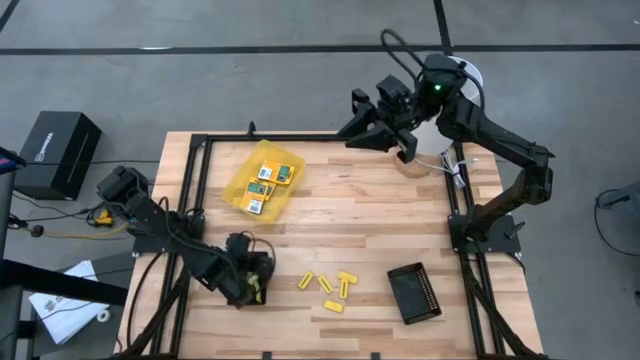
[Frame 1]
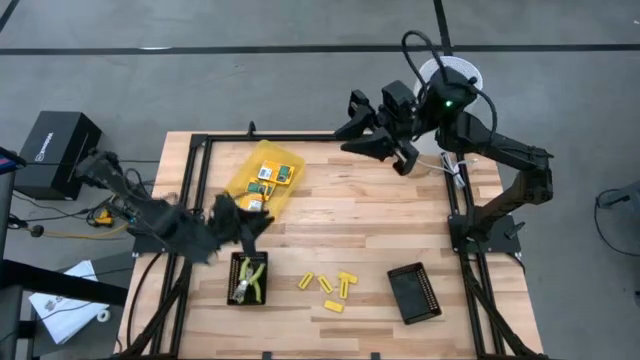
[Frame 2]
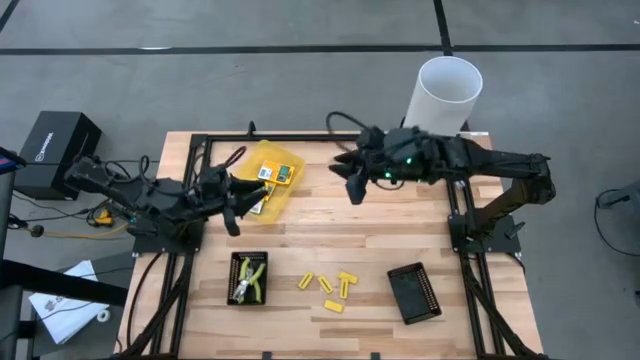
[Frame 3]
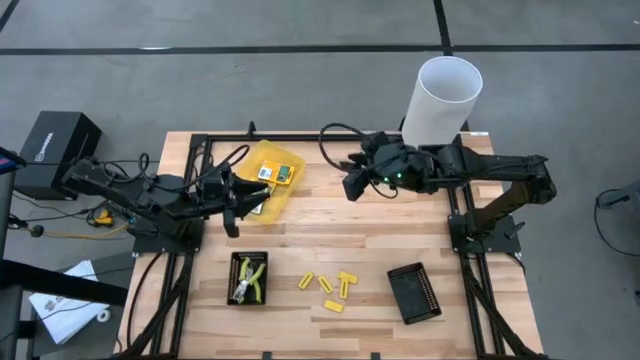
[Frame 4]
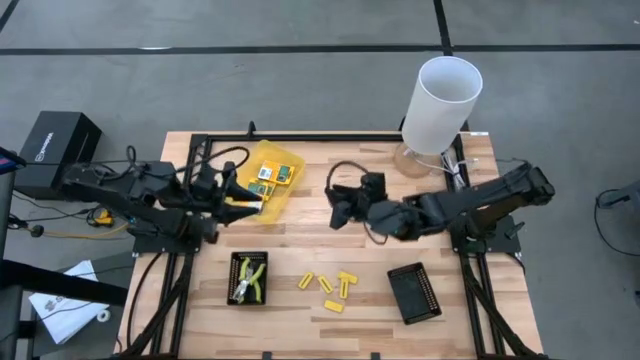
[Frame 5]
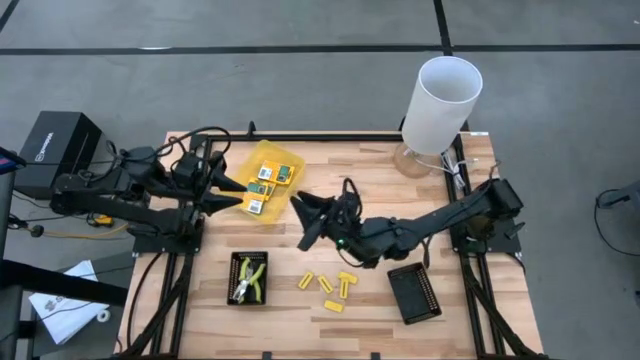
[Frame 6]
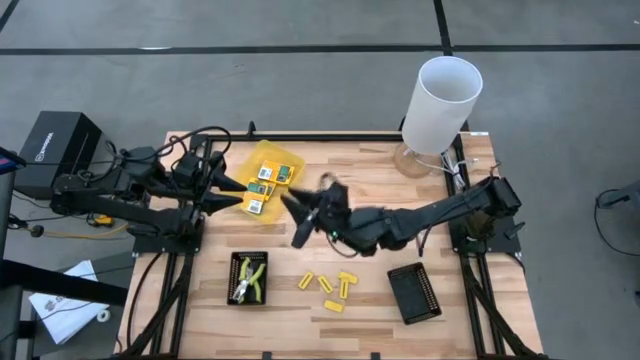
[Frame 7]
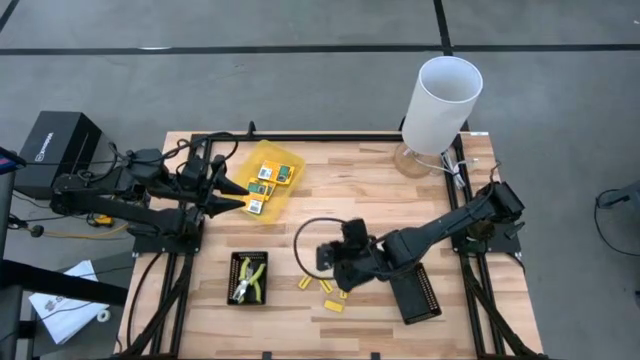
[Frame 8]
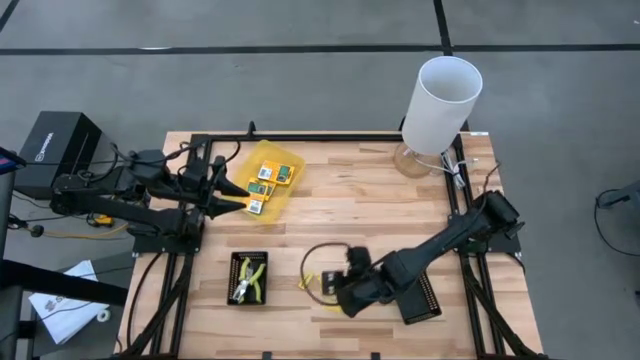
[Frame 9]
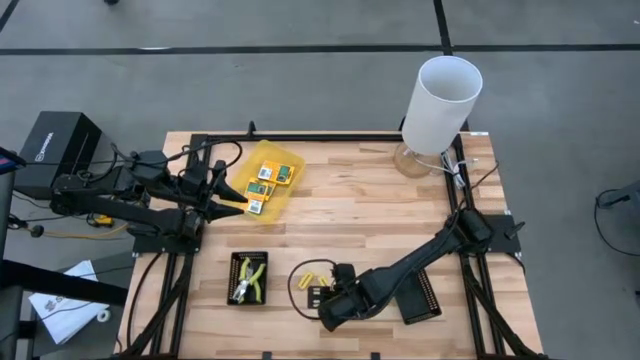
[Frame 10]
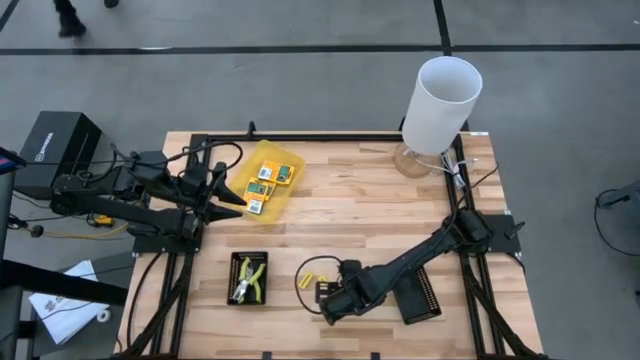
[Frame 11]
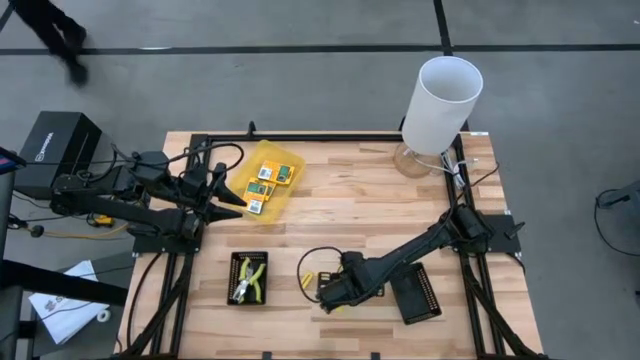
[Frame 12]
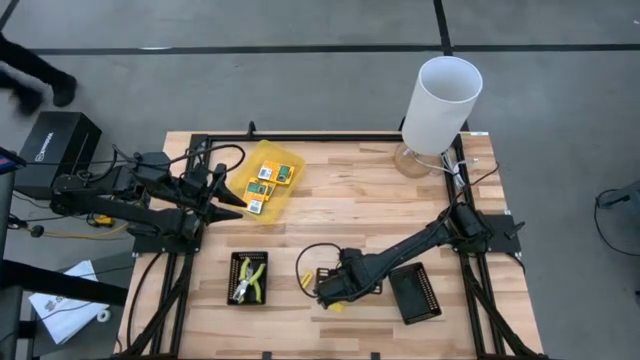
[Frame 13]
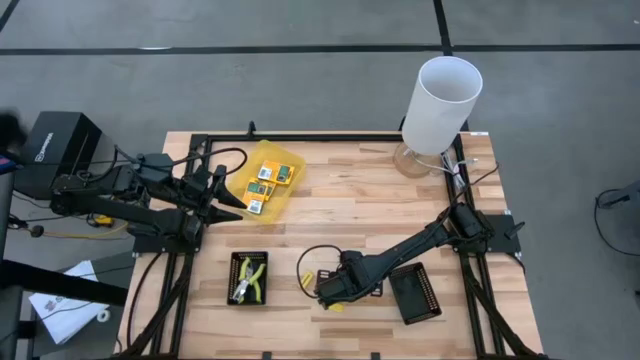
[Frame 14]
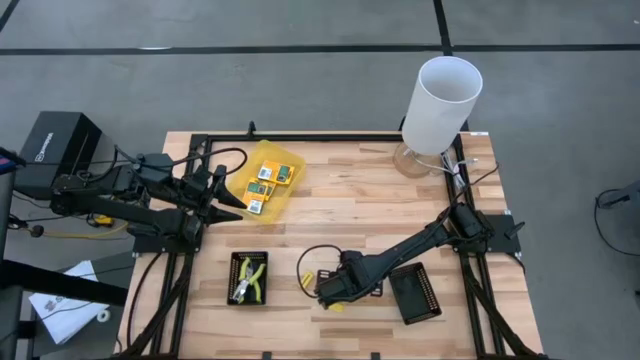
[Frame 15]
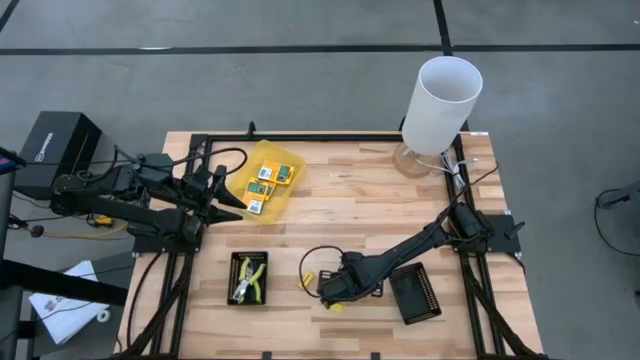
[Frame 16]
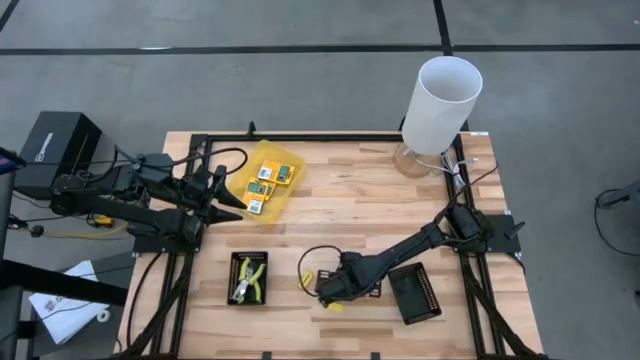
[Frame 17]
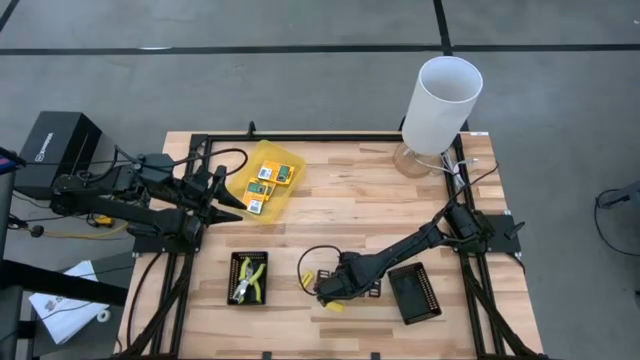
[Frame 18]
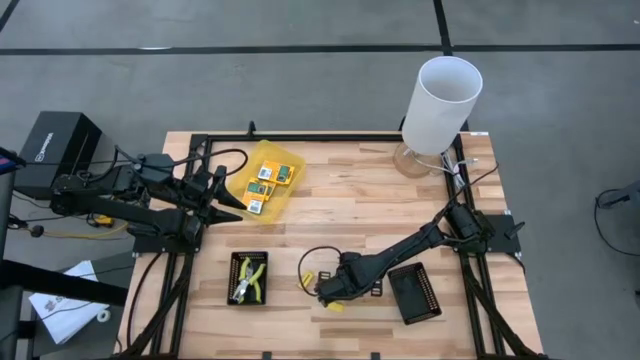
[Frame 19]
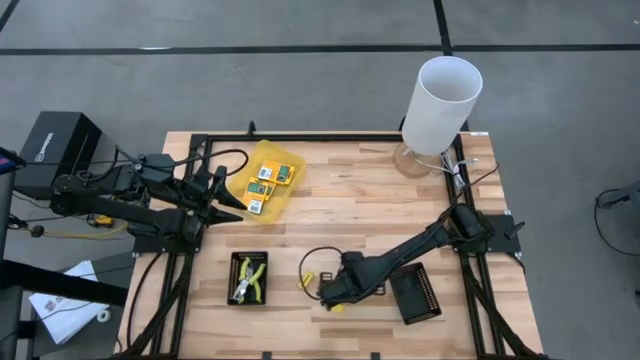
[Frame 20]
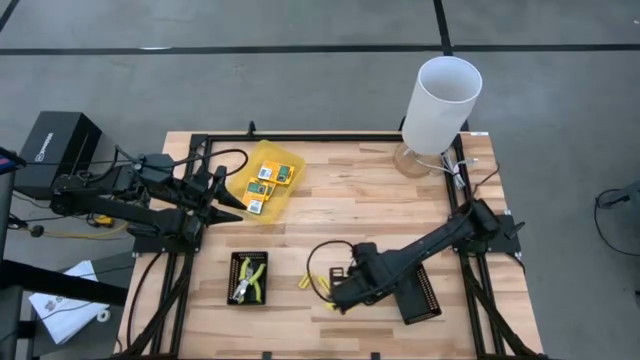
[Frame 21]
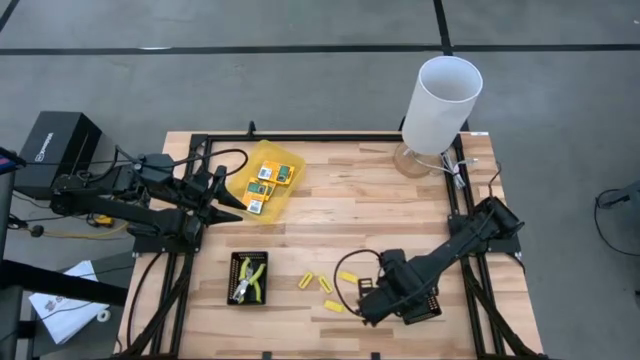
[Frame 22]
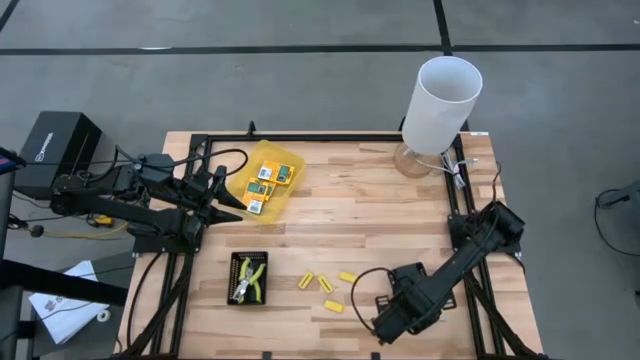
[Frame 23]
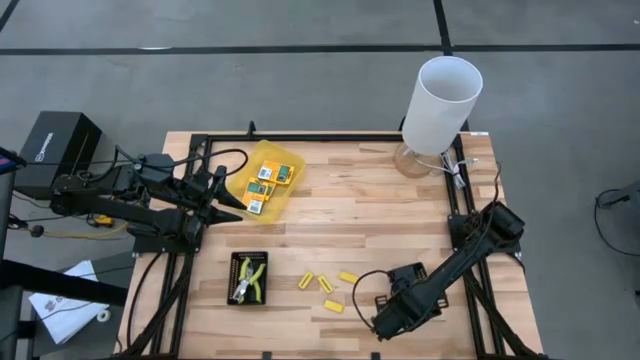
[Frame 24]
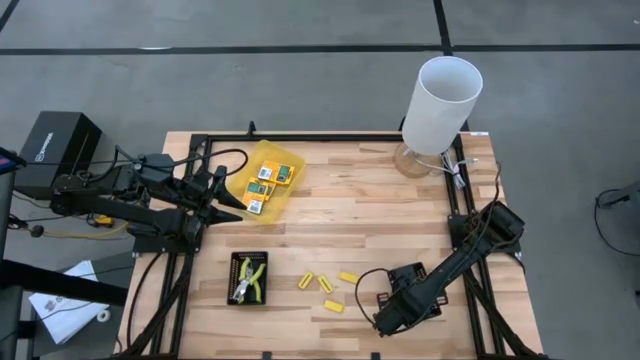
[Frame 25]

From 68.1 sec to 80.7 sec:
Task: Pick & Place School Supplies
Put the yellow eraser into the right black bin

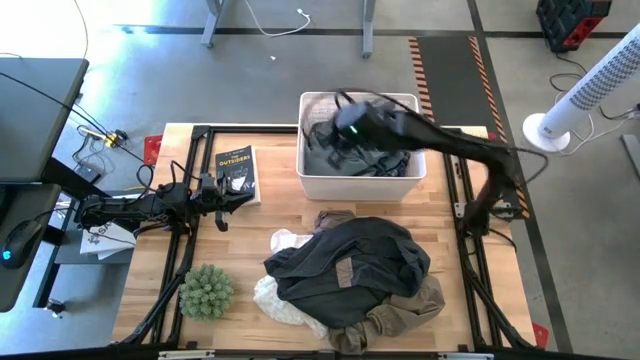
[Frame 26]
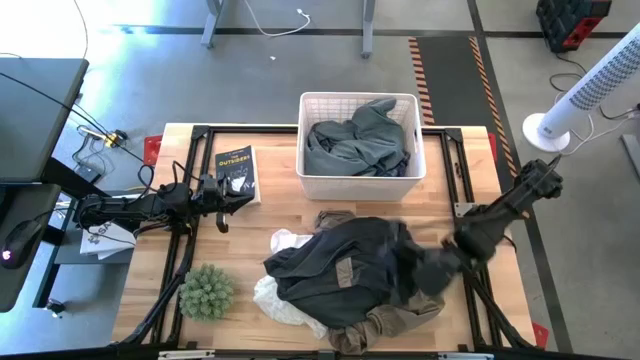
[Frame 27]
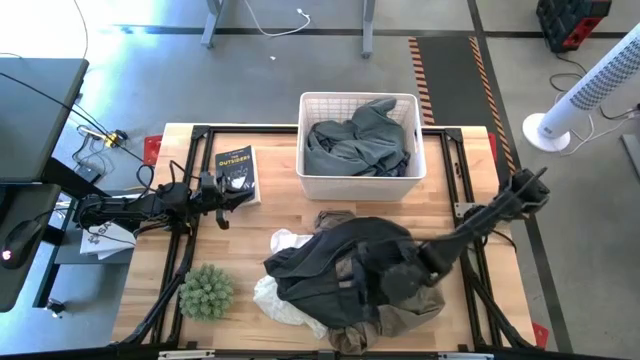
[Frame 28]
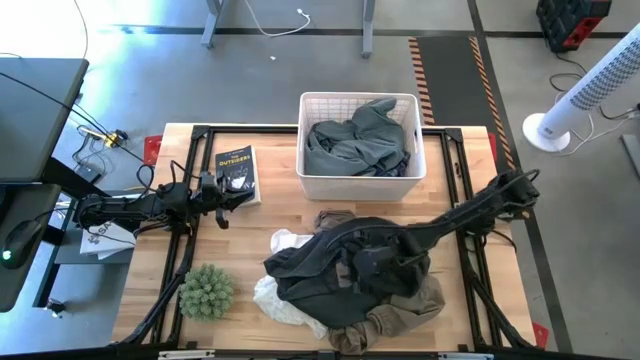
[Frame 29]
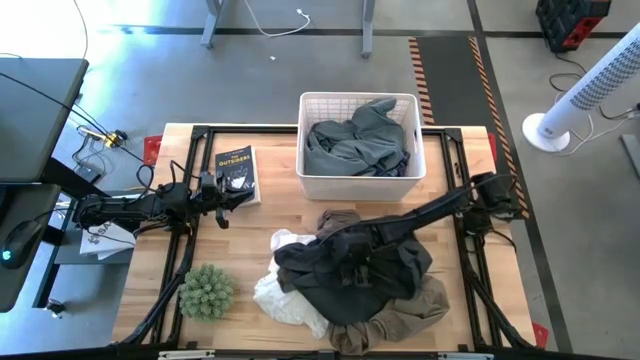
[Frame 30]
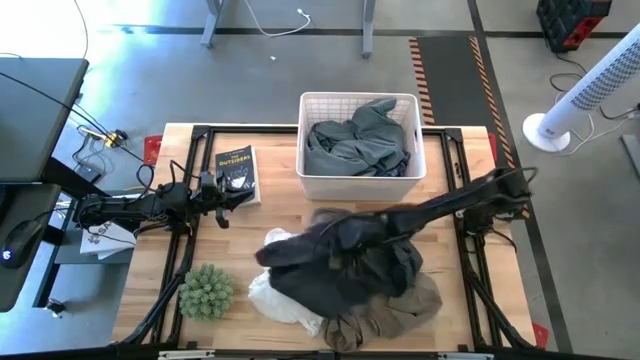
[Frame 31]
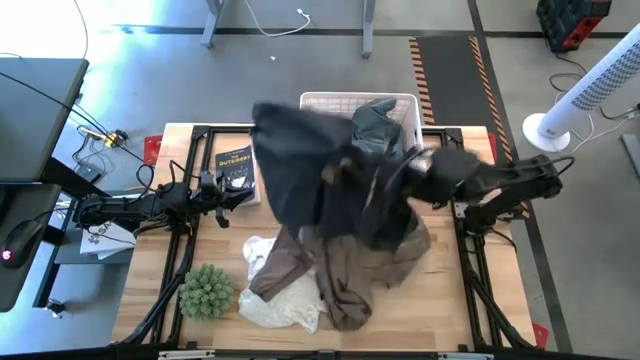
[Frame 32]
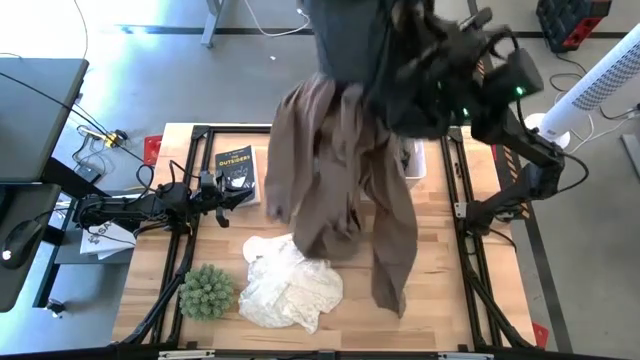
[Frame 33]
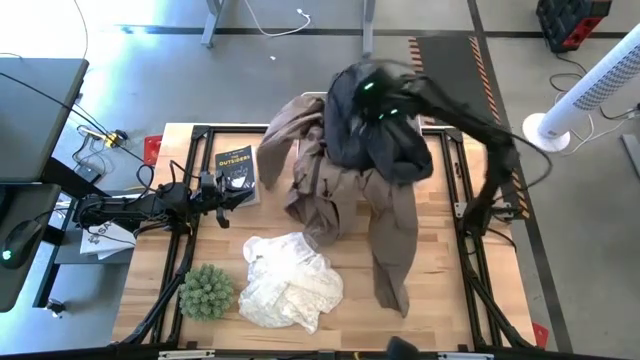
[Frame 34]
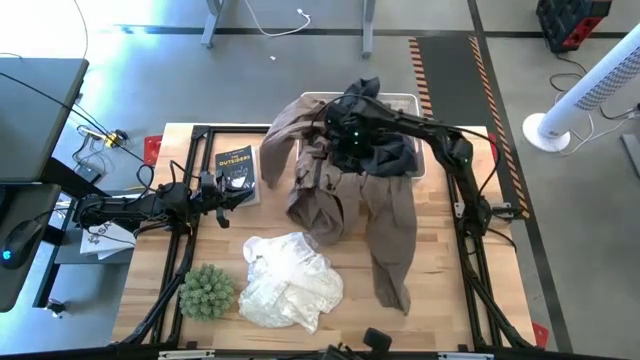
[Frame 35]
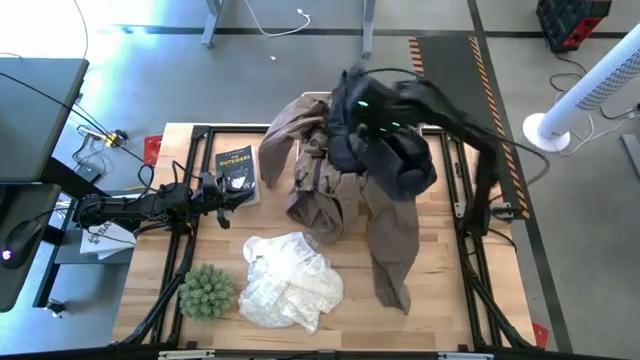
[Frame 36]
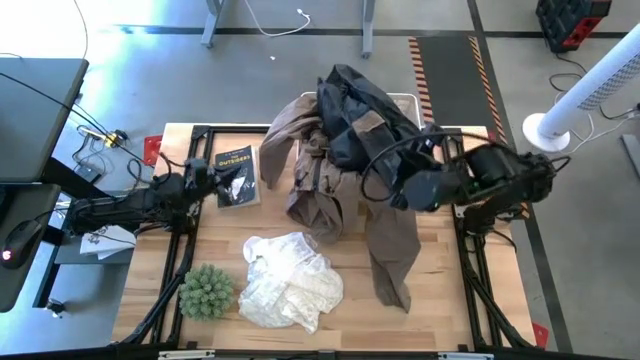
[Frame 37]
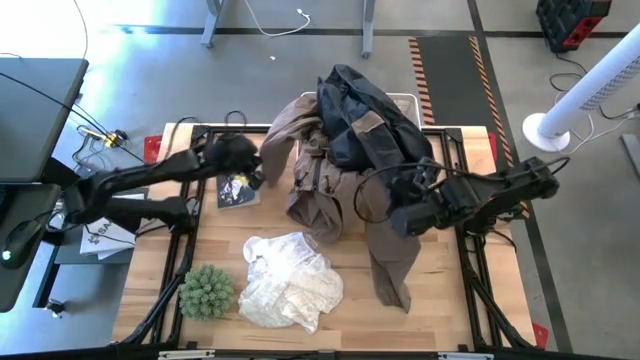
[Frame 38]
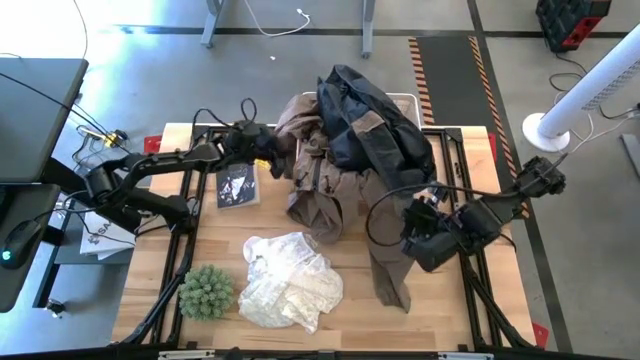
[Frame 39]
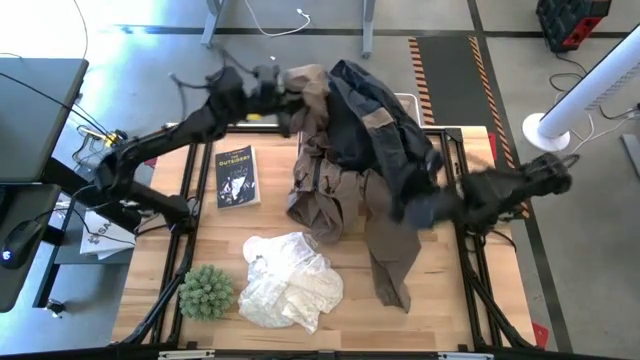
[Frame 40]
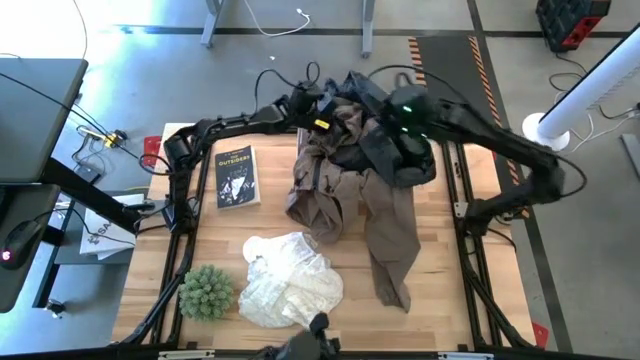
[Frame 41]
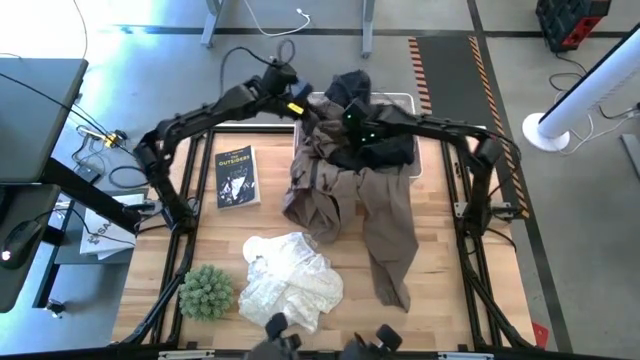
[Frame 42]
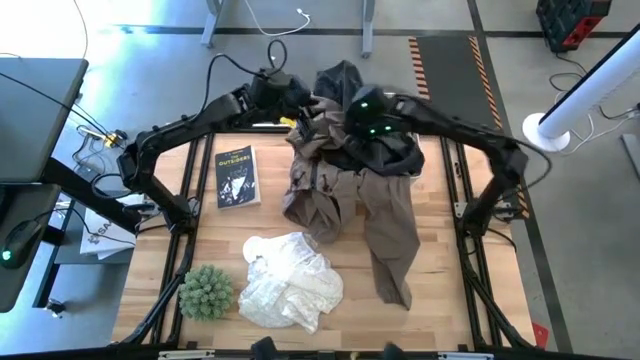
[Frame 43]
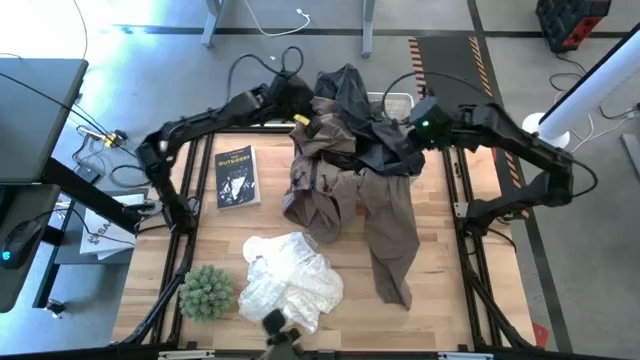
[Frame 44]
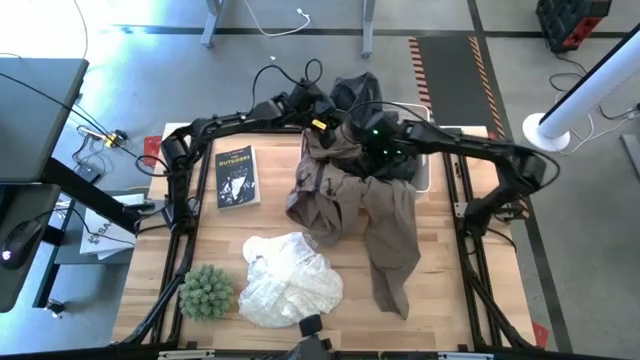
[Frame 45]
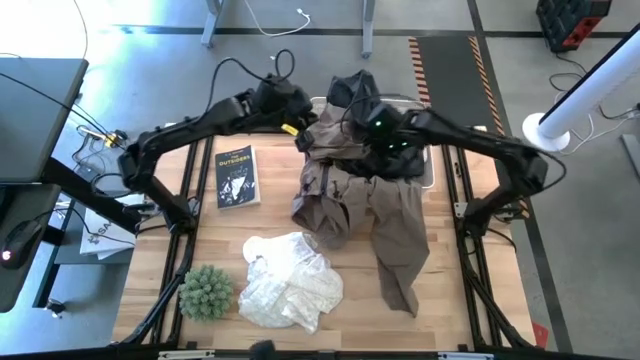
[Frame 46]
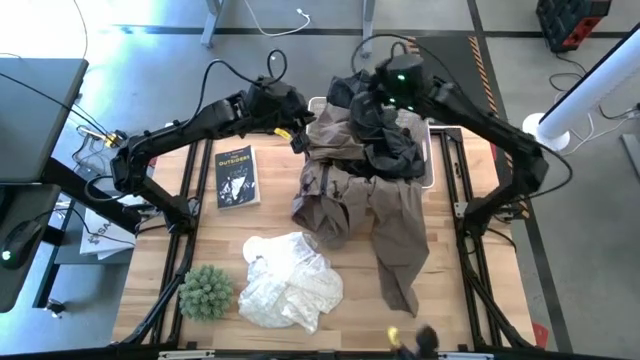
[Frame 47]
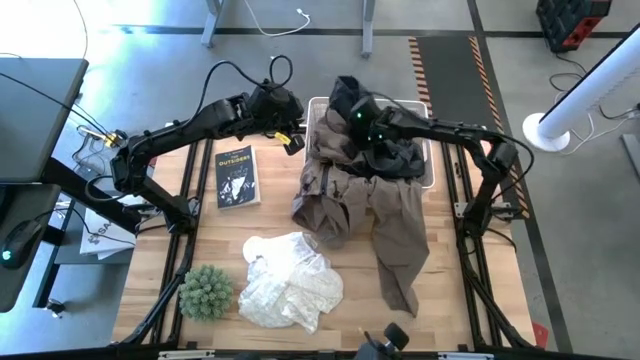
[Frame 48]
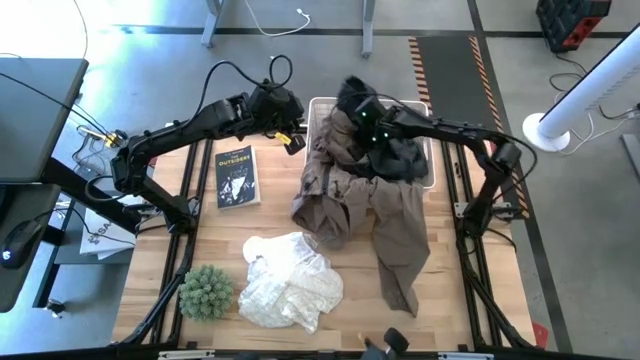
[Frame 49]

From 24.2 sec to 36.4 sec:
Task: Sort clothes
Put the brown and black jacket into the white bin
